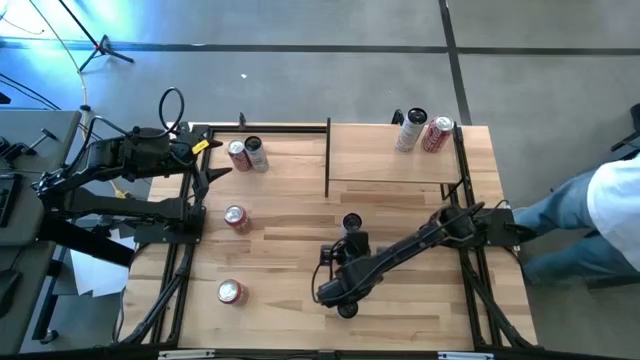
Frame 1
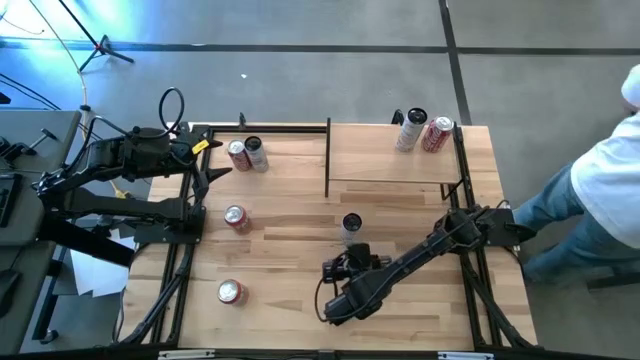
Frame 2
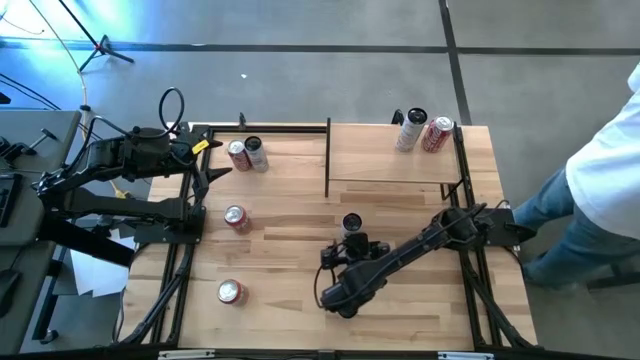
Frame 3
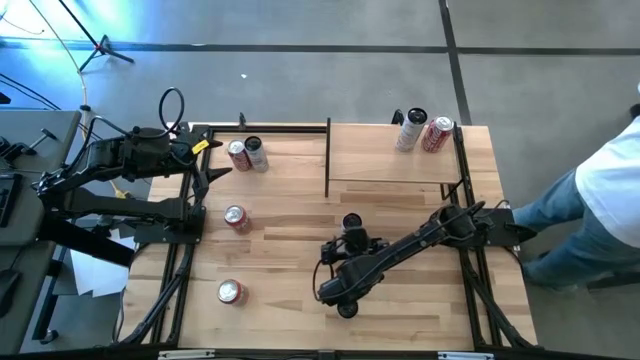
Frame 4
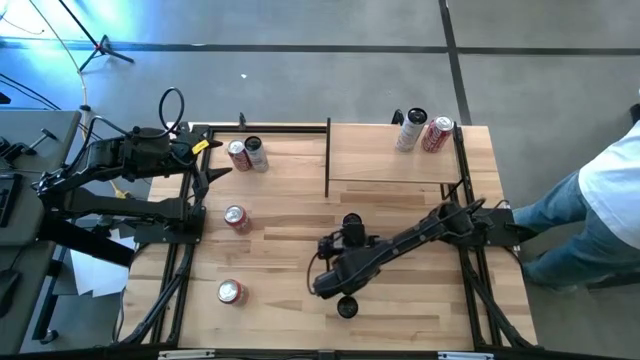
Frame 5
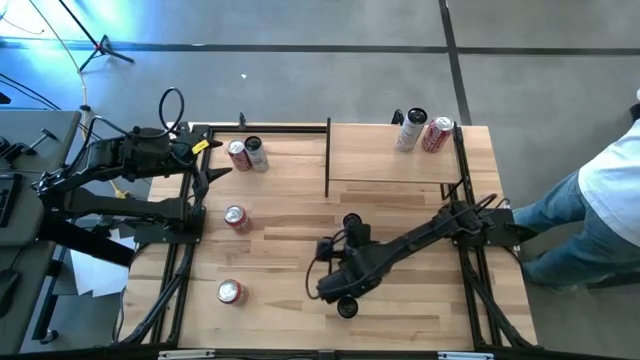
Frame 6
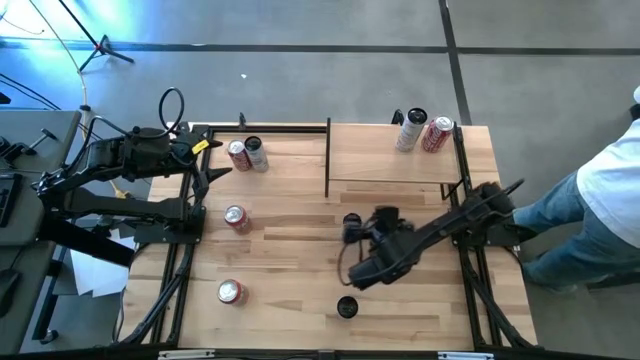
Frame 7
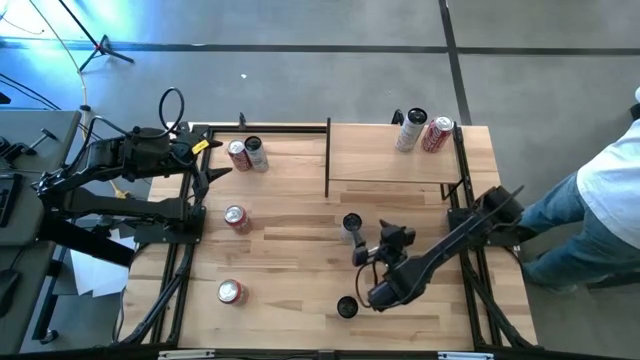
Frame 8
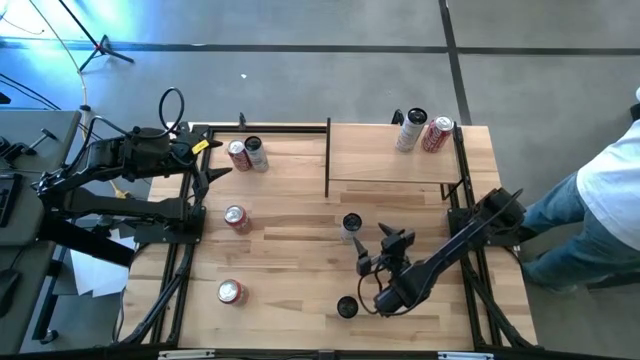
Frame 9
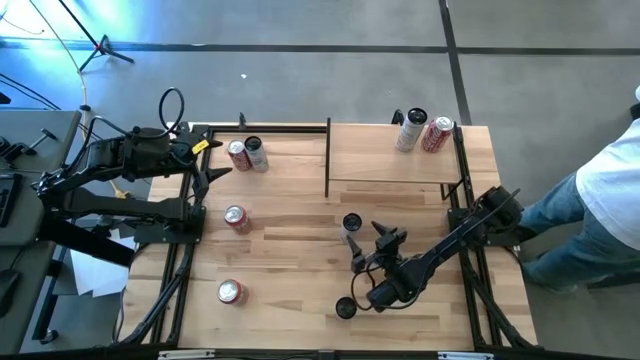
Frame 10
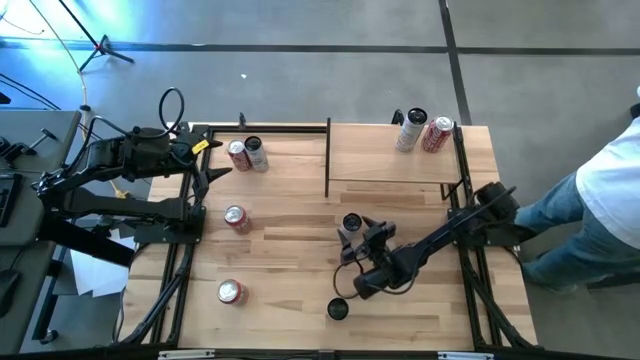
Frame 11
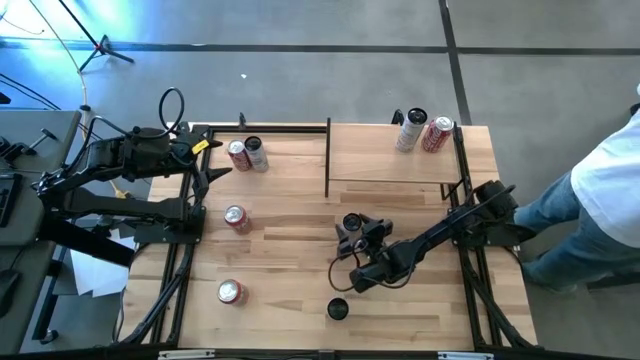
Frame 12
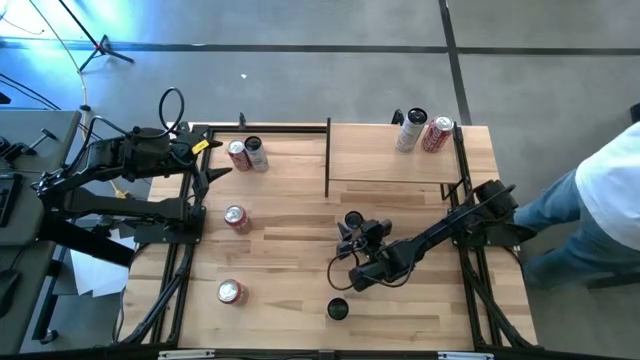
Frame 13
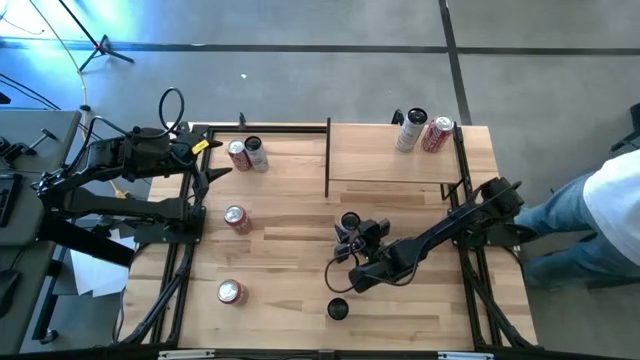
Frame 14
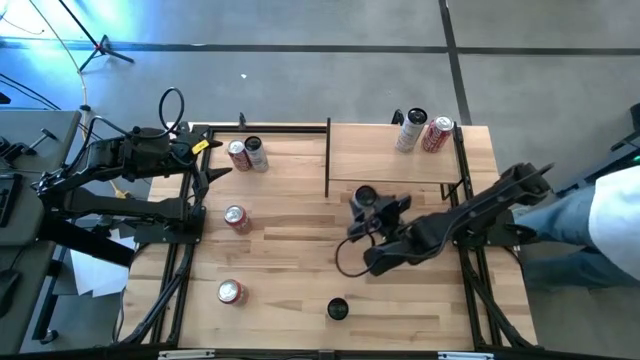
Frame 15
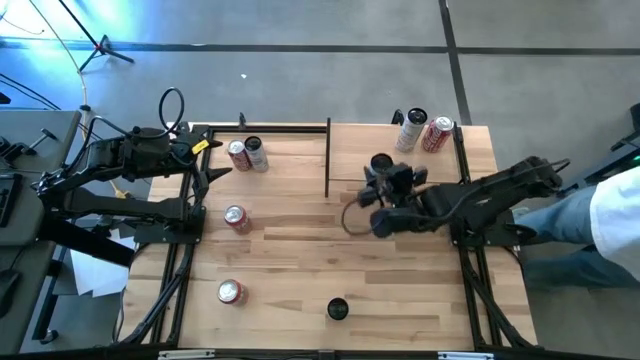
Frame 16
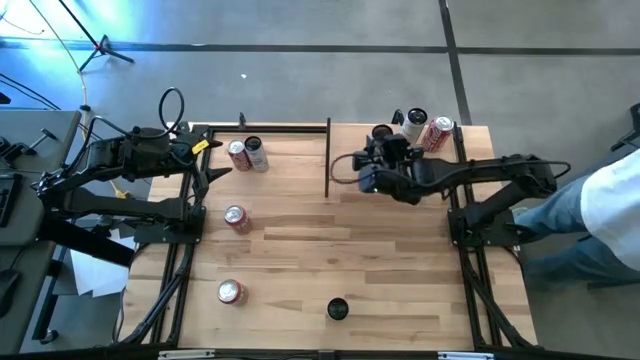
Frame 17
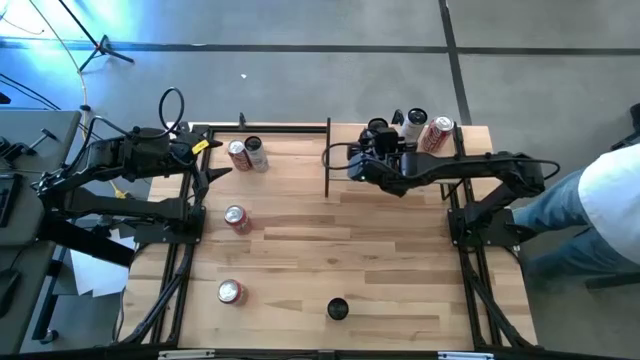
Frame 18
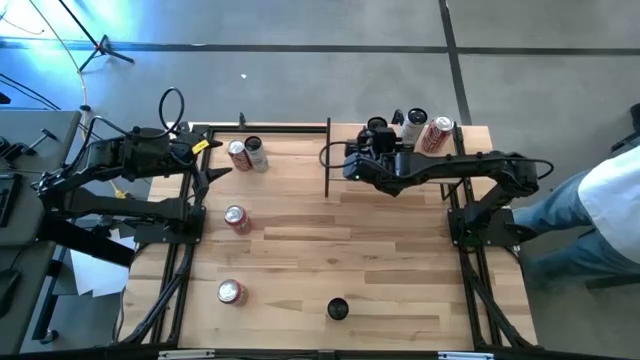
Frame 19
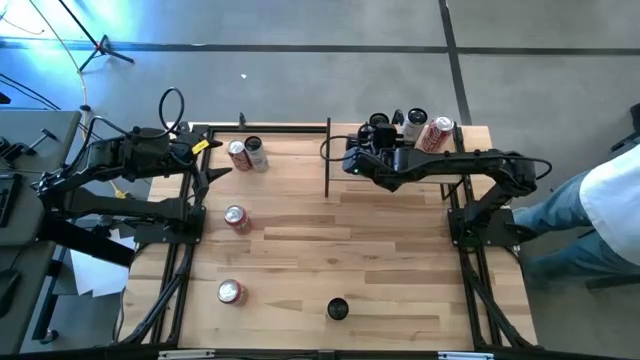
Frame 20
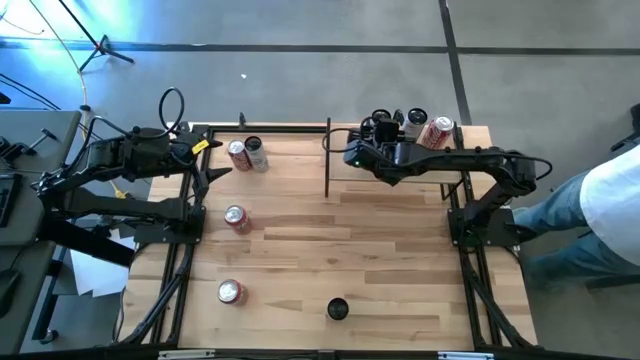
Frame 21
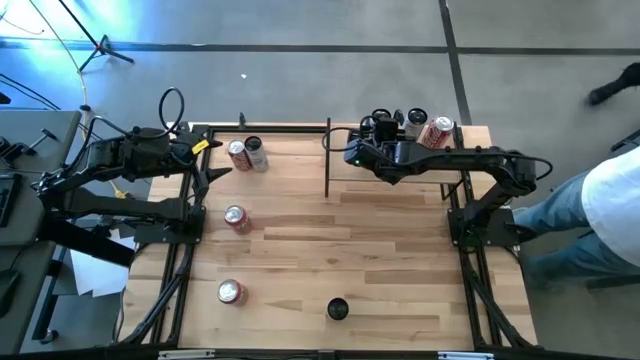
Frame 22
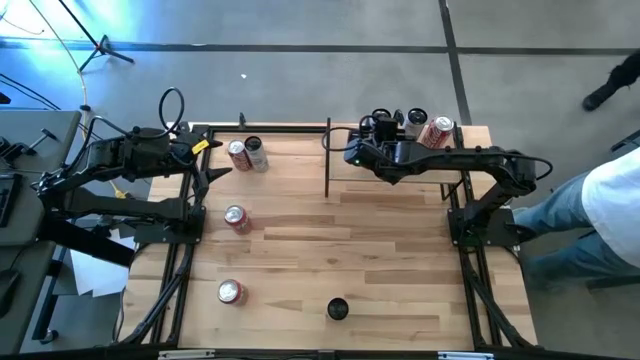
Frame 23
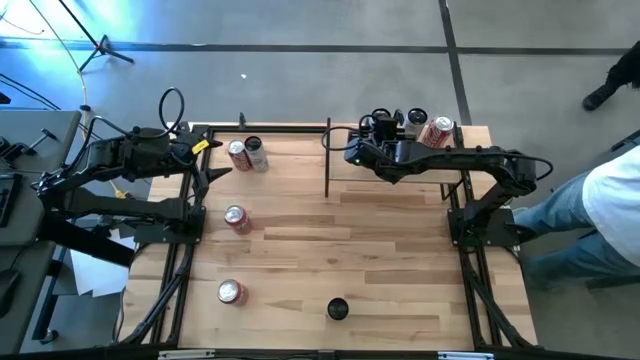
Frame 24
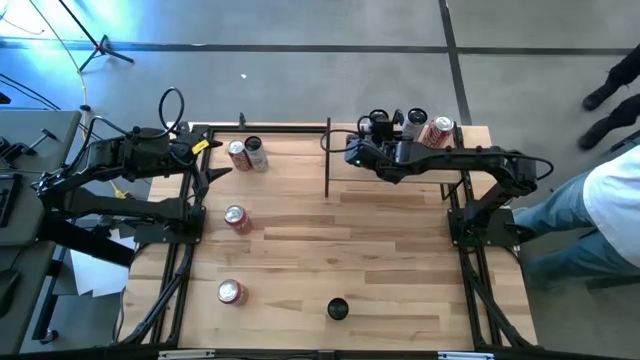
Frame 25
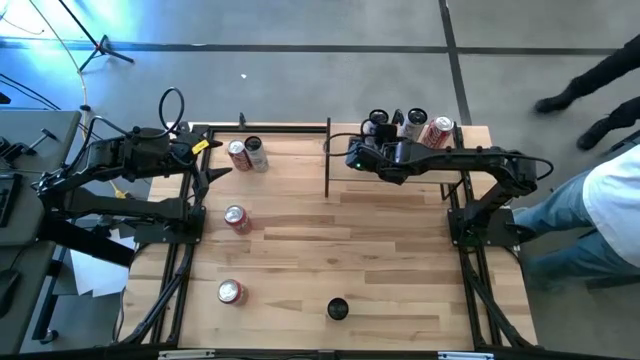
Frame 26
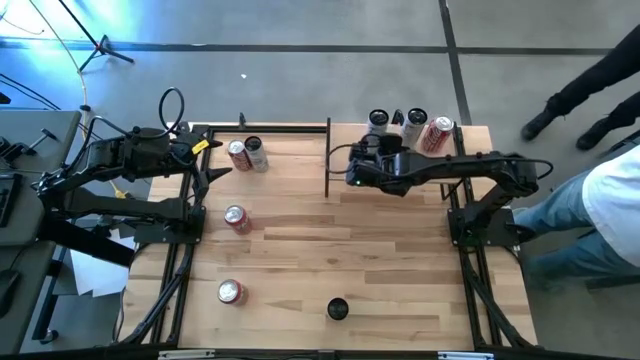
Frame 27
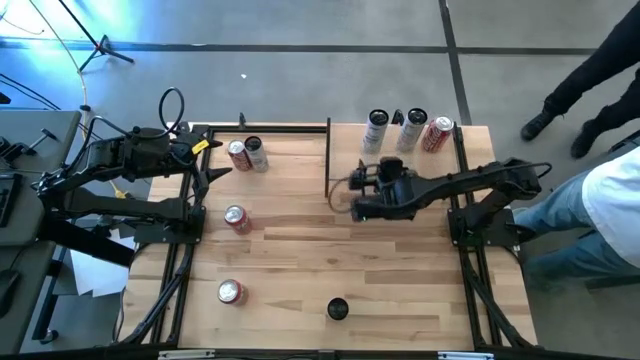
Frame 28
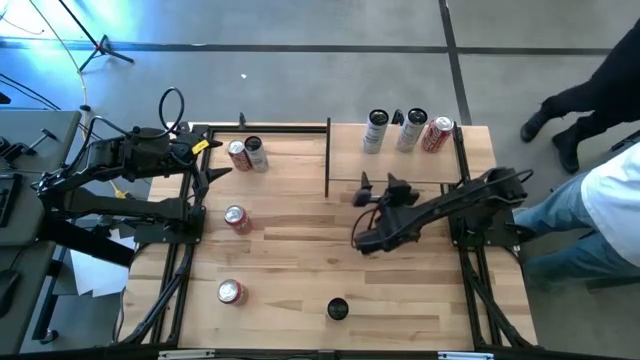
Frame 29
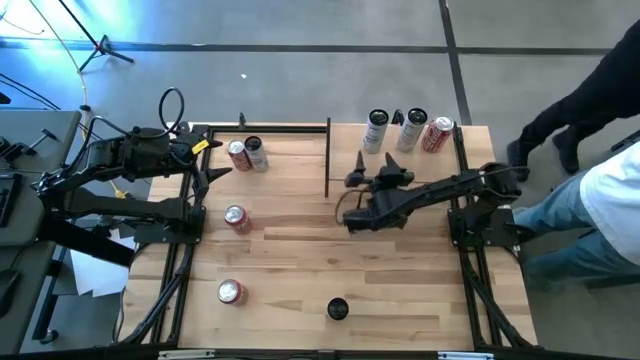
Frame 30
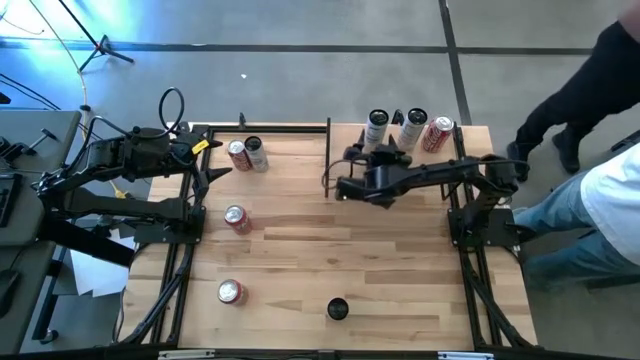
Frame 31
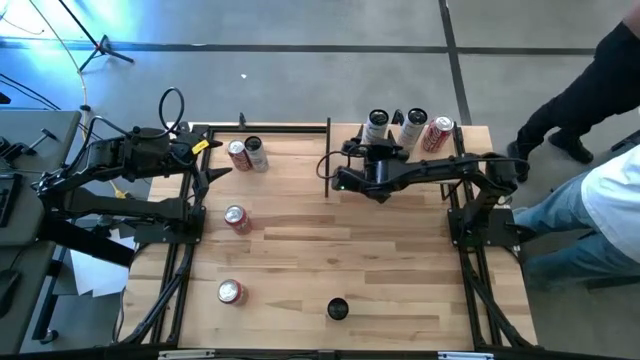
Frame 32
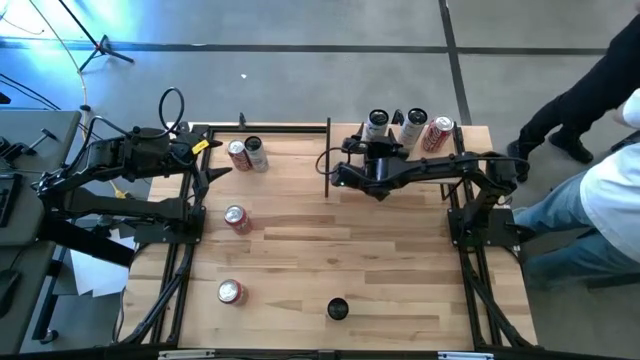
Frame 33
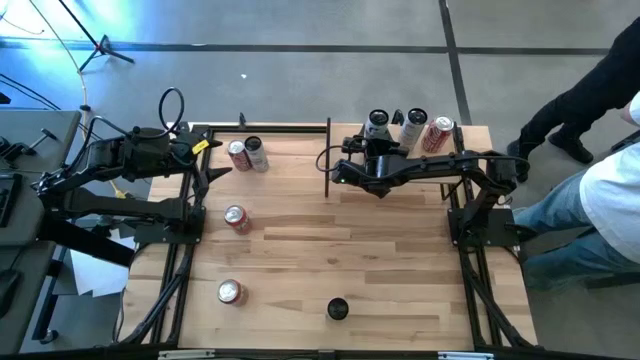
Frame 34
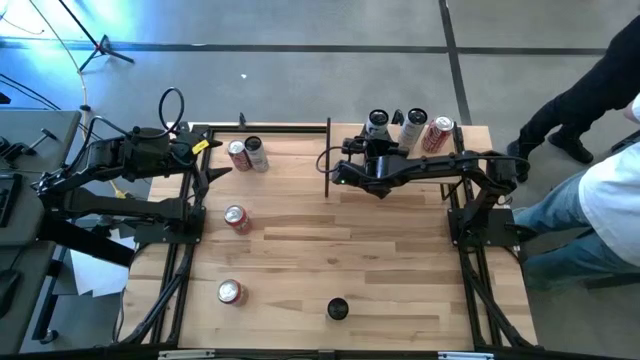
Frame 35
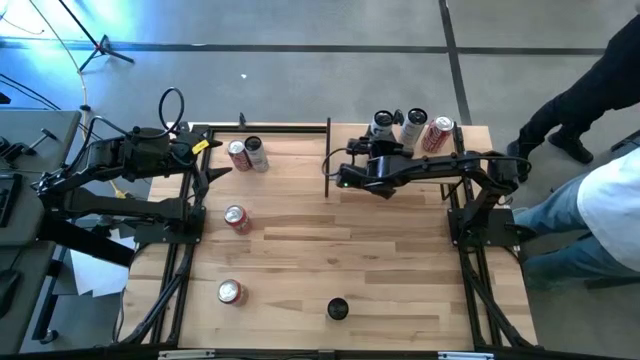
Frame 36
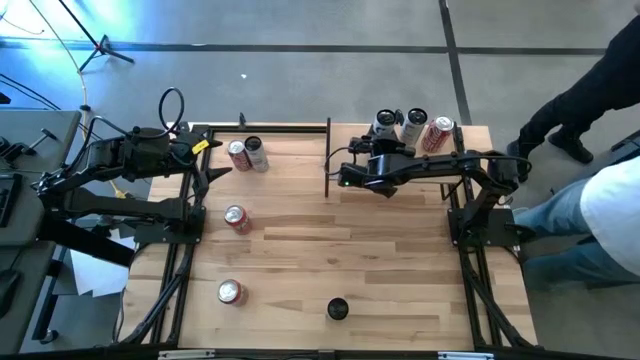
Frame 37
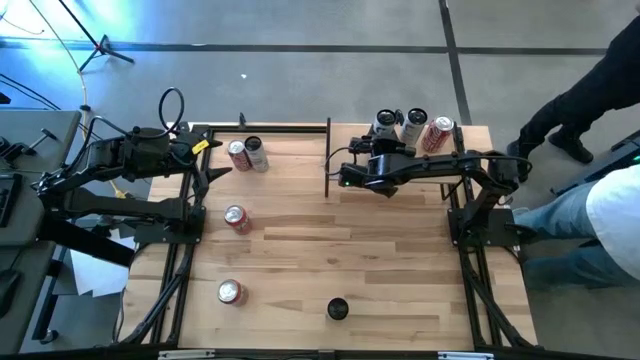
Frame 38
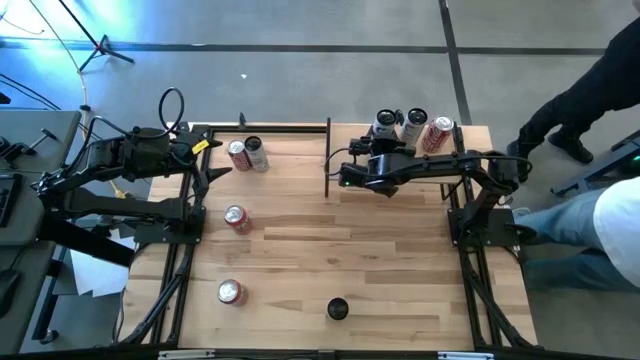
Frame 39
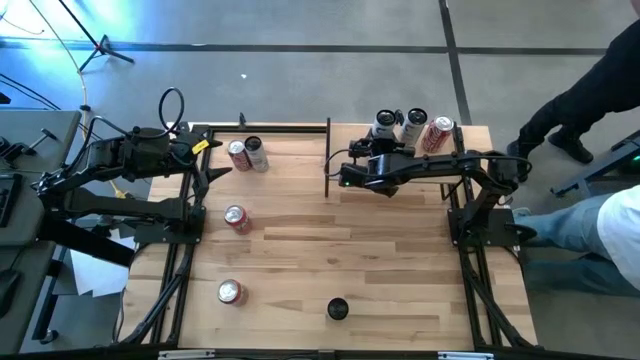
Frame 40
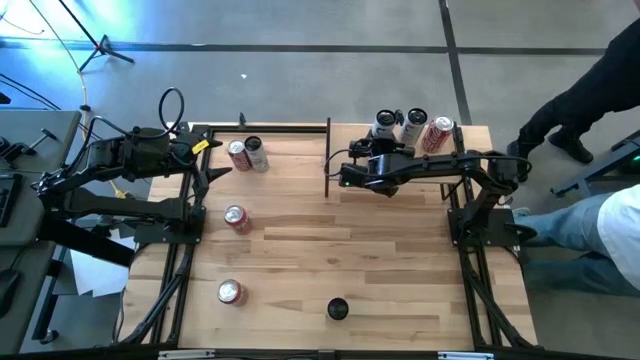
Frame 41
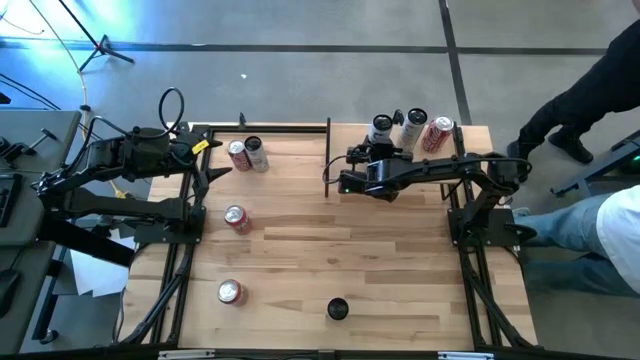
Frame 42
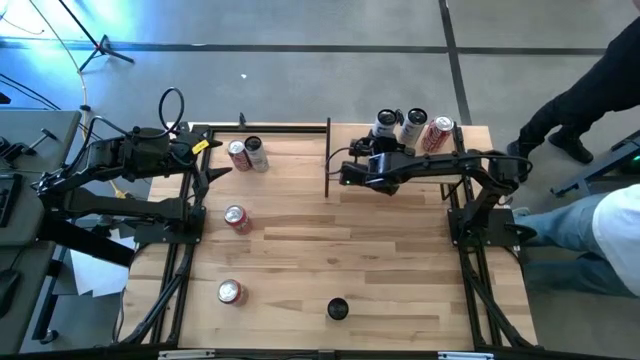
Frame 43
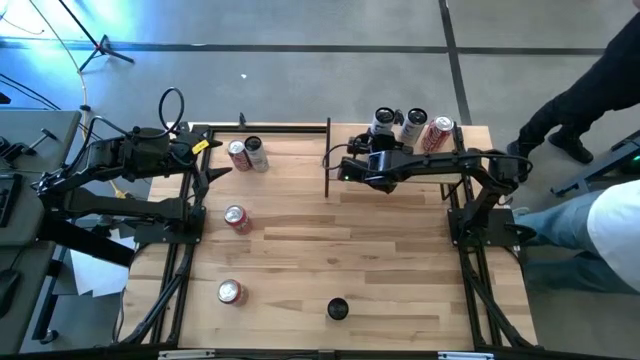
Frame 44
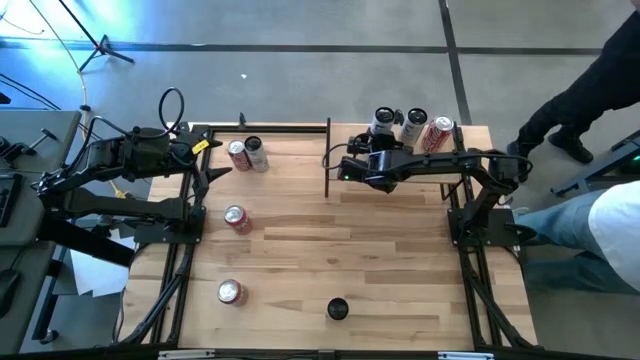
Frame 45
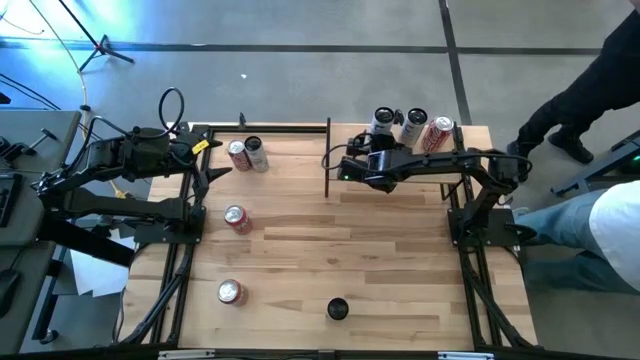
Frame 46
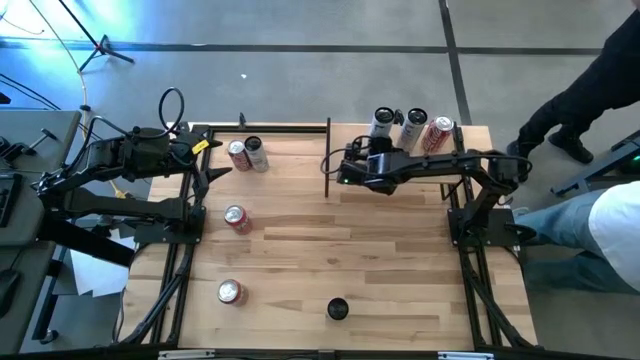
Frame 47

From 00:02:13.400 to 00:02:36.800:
Task: Place canned beverage on shelf
Put the white soda can on the shelf
